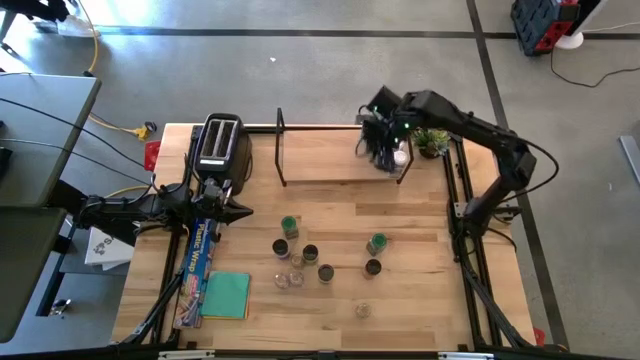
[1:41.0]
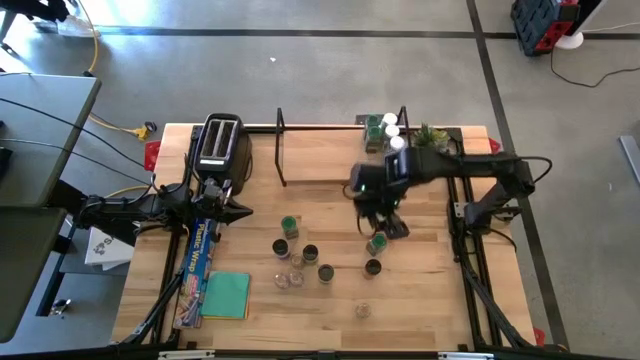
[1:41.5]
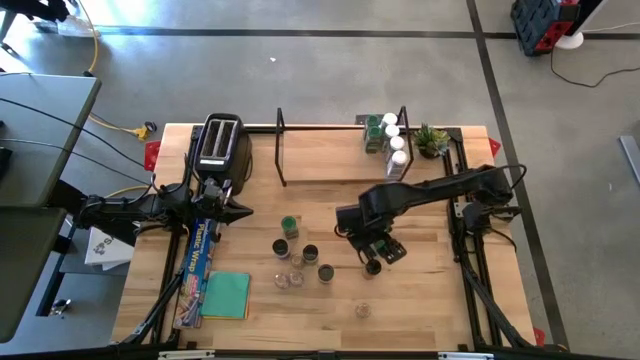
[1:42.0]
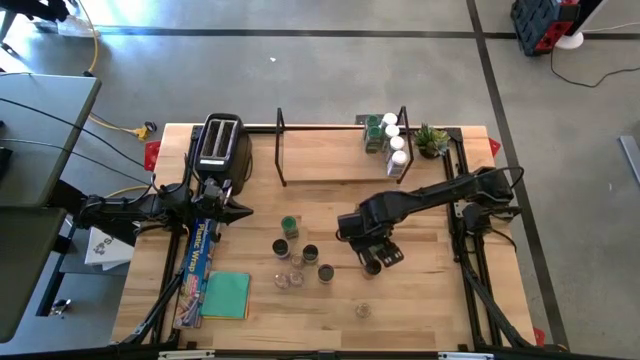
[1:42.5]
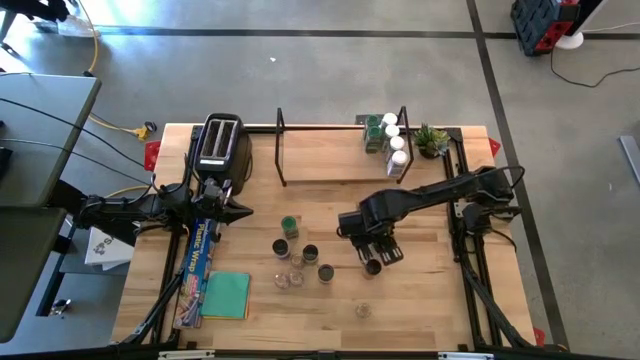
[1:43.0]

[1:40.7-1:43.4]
Task: Shelf spices
Put the green seasoning bottle on the shelf and align it with the other green seasoning bottles

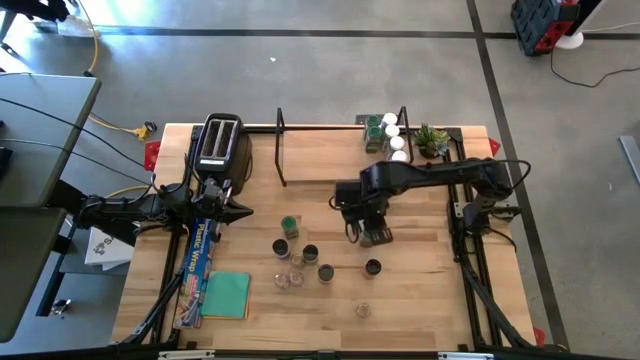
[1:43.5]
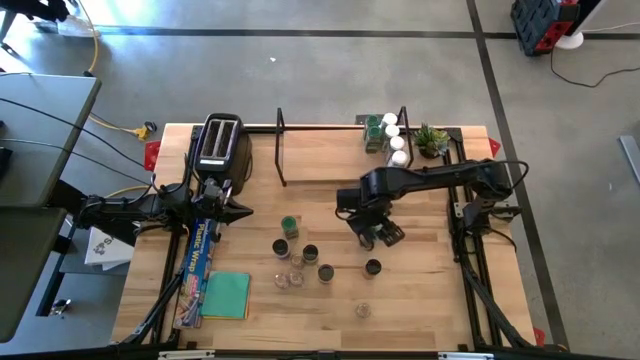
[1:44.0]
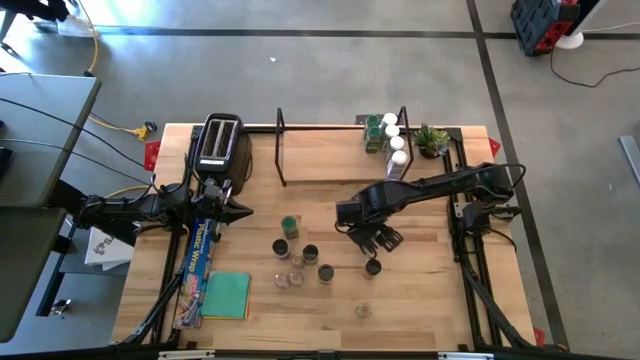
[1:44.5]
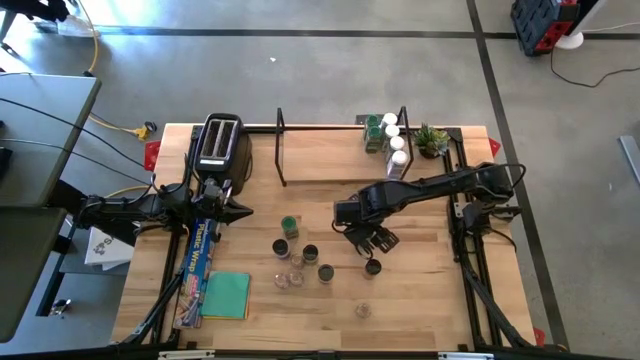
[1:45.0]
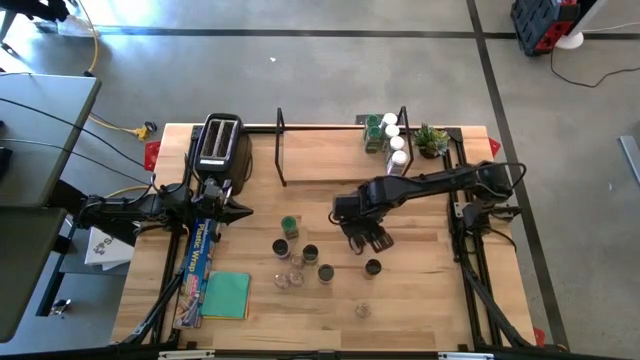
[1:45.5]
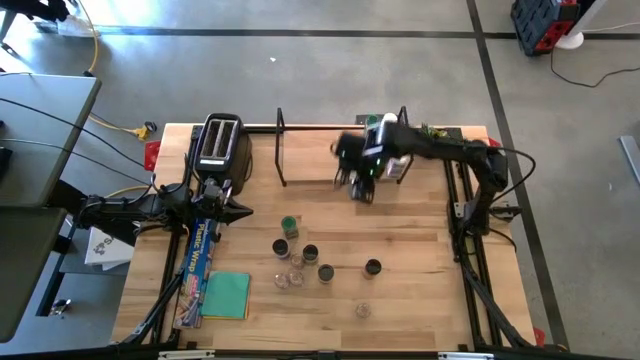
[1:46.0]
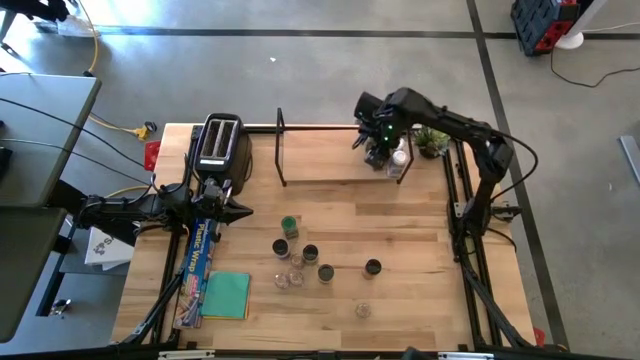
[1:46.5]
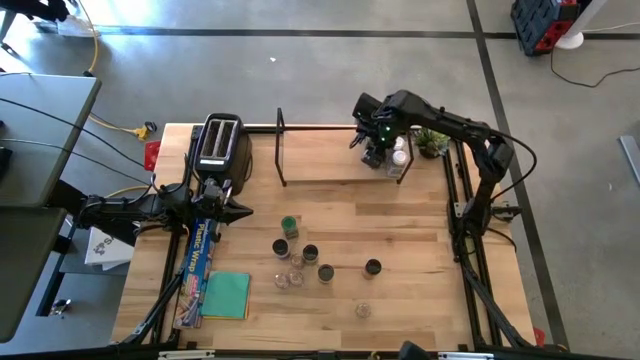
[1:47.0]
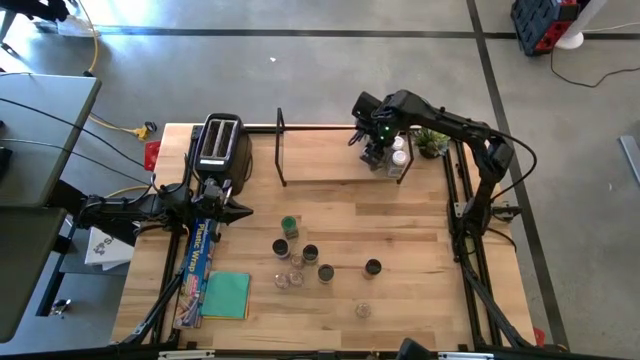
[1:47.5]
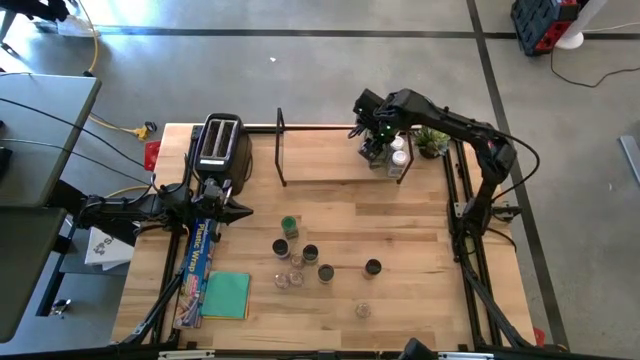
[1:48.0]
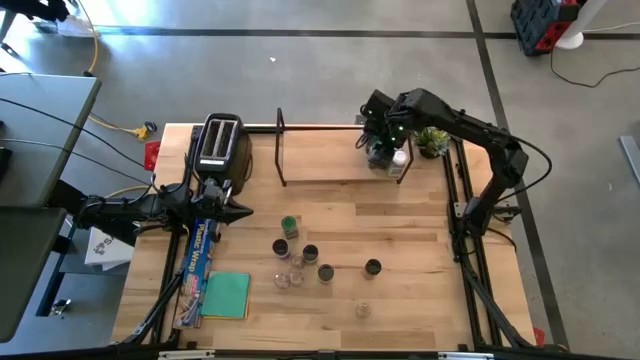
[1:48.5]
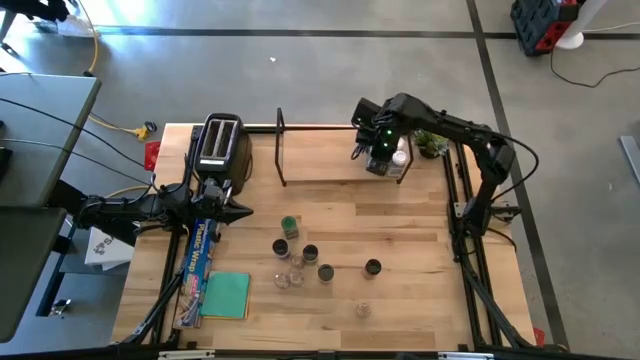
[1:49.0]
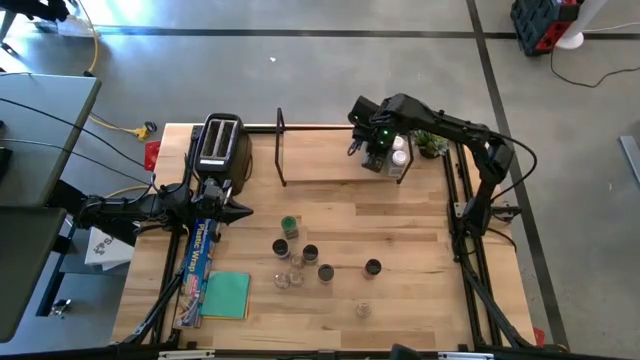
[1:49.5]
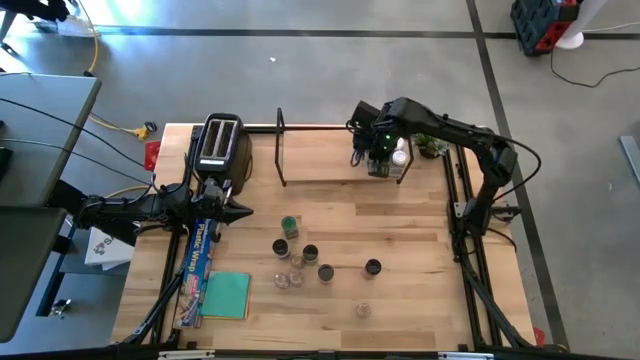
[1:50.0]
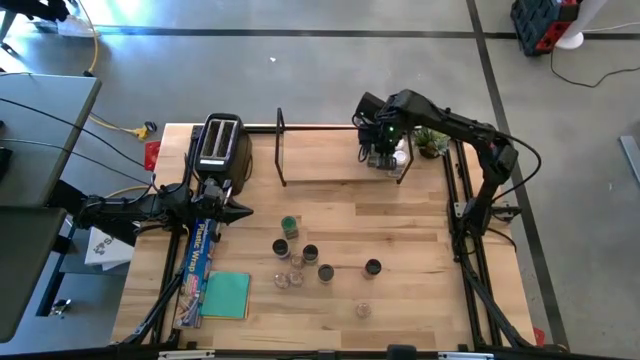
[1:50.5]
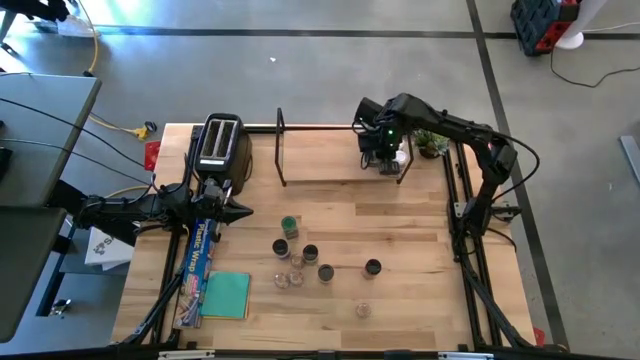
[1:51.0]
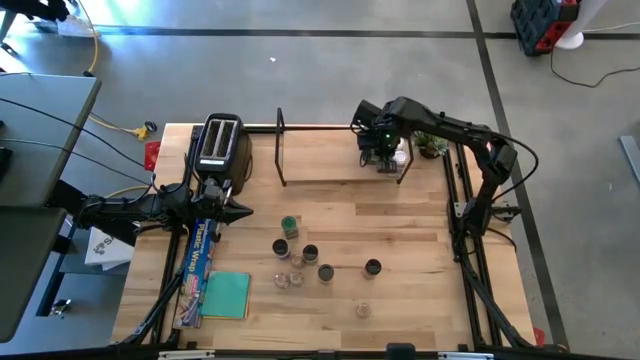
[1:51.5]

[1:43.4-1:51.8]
Put the green seasoning bottle on the shelf and align it with the other green seasoning bottles

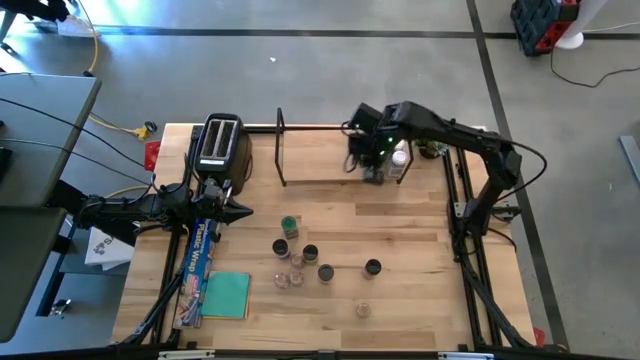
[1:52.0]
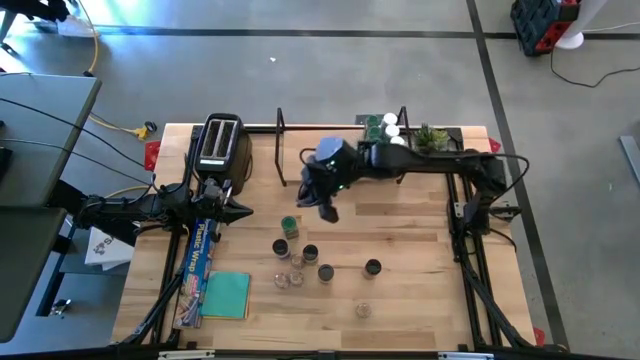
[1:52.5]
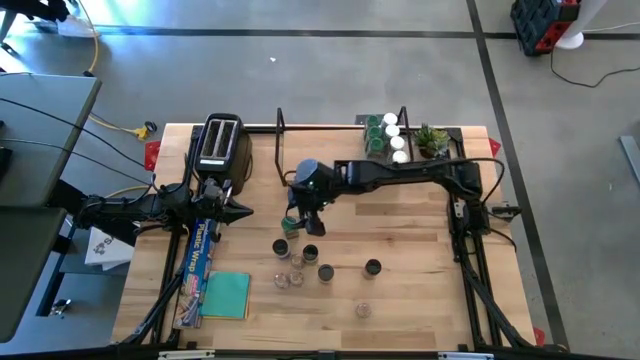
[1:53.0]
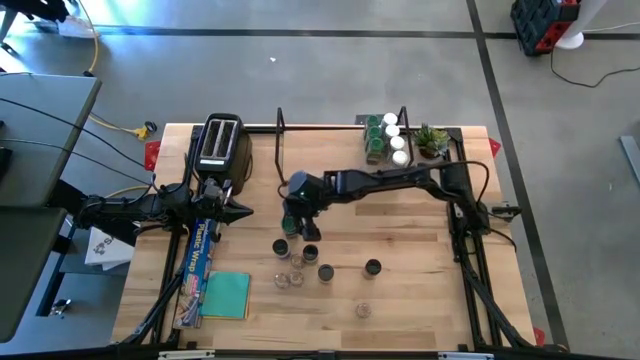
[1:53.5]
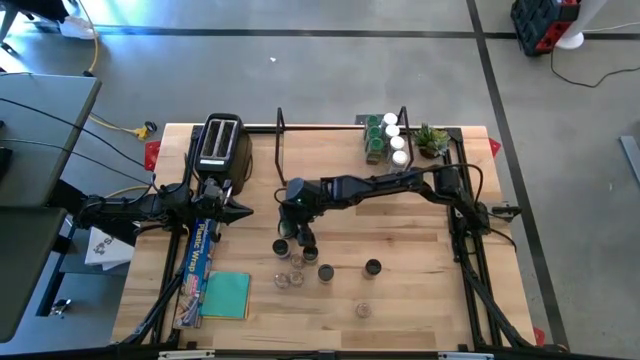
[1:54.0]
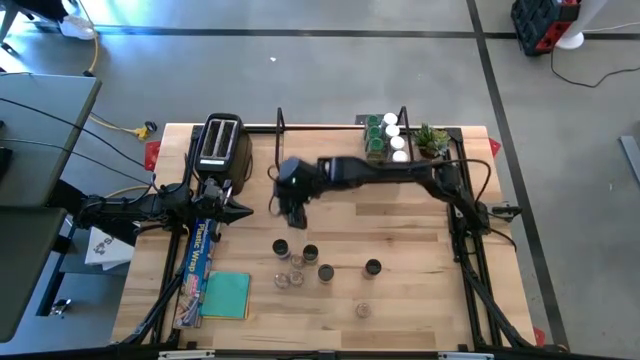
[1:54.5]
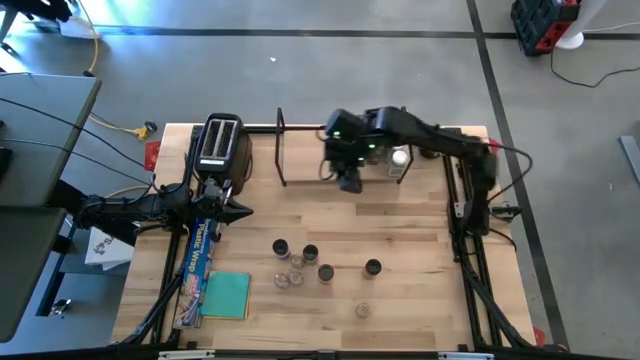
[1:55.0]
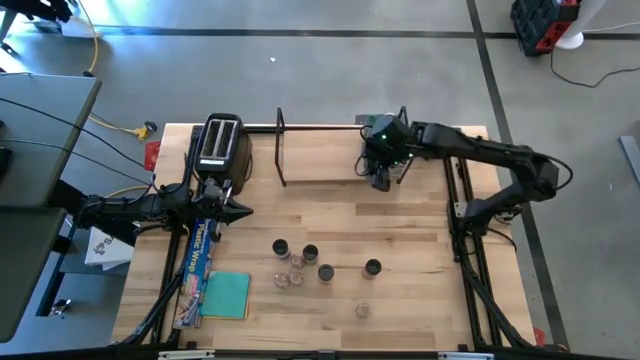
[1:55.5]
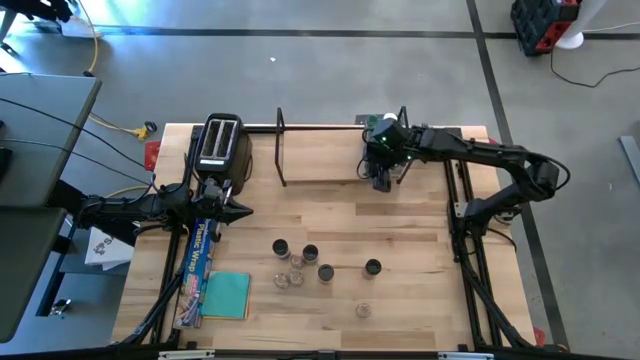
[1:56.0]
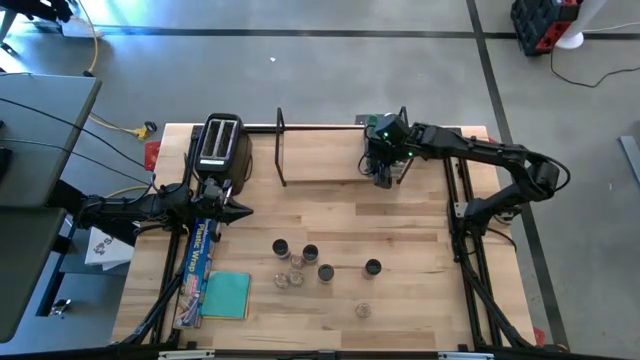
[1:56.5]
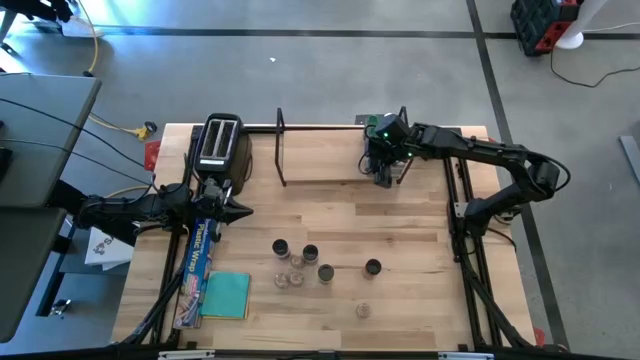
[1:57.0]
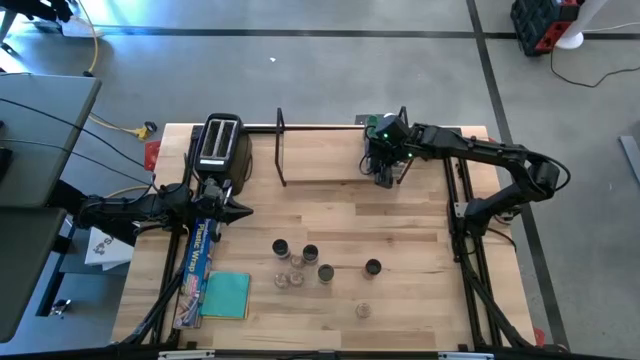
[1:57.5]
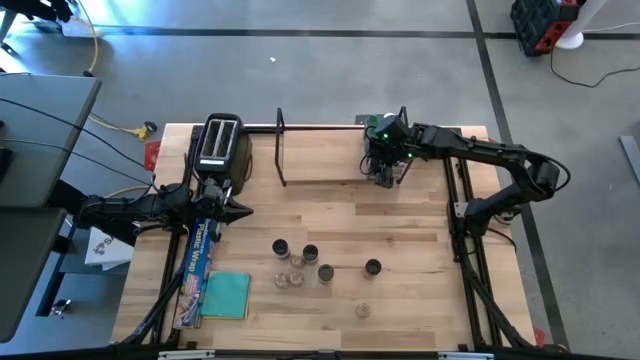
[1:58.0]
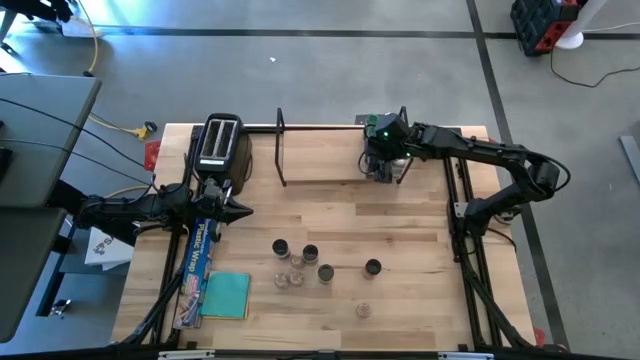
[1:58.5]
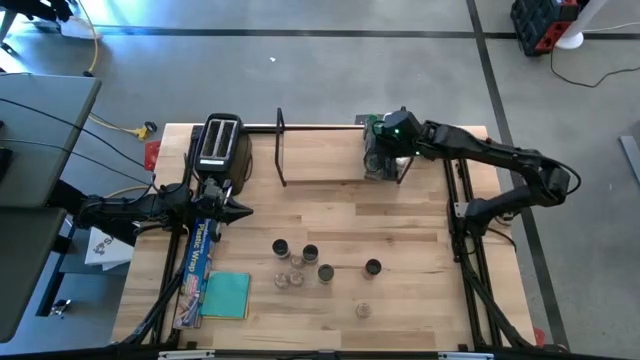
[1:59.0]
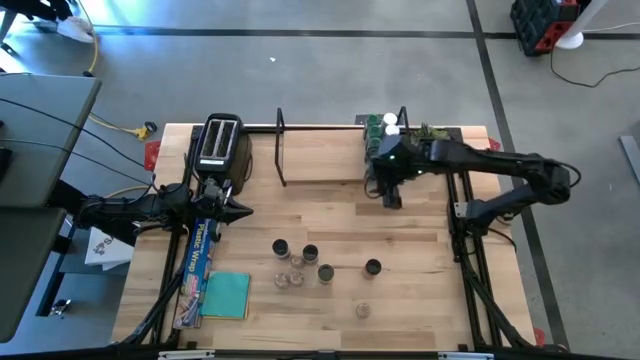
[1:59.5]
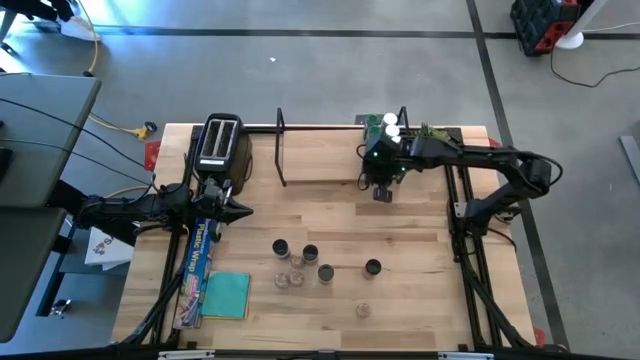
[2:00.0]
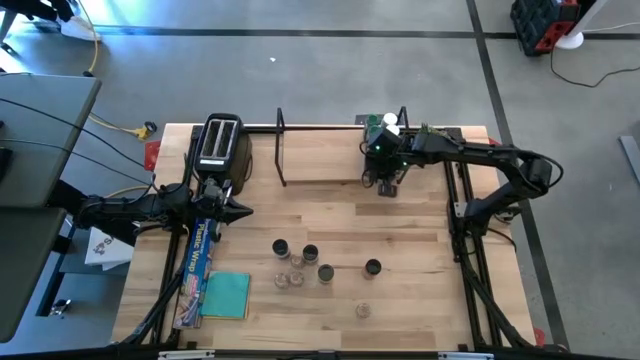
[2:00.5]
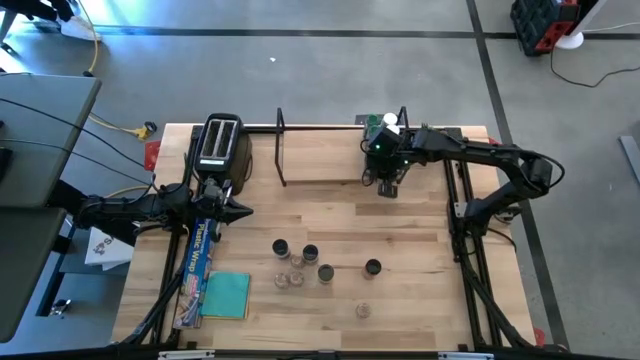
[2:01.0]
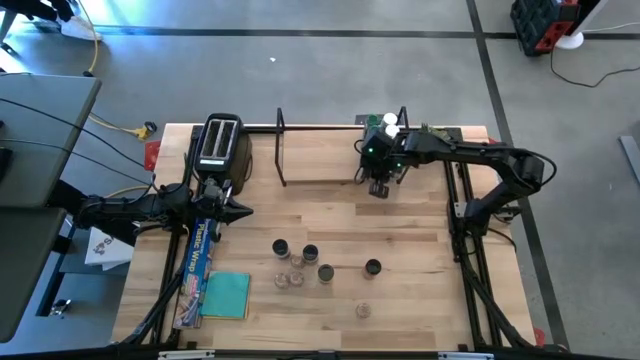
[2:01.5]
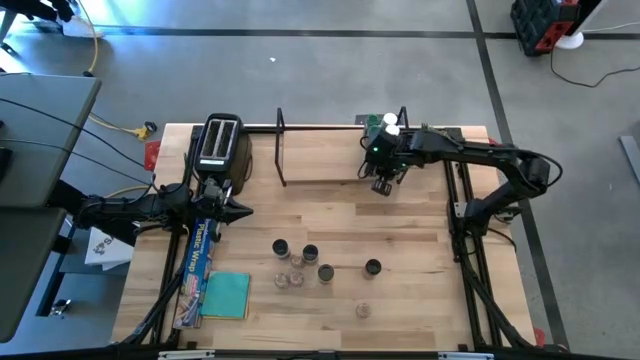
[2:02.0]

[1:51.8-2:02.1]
Put the green seasoning bottle on the shelf and align it with the other green seasoning bottles
